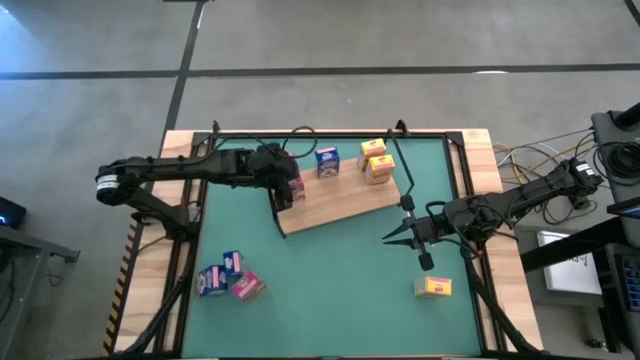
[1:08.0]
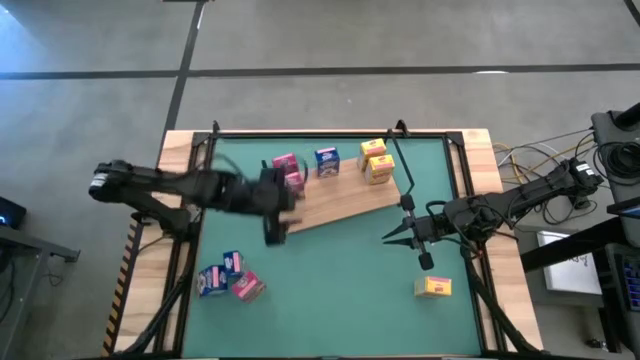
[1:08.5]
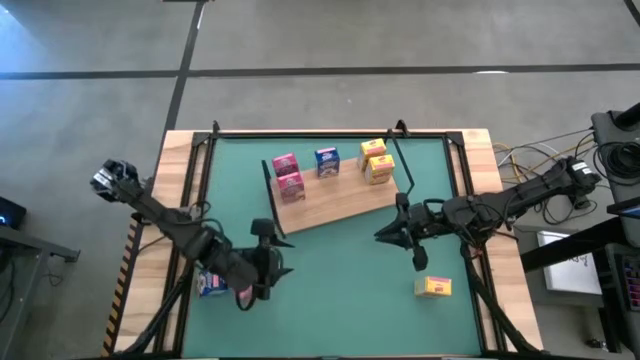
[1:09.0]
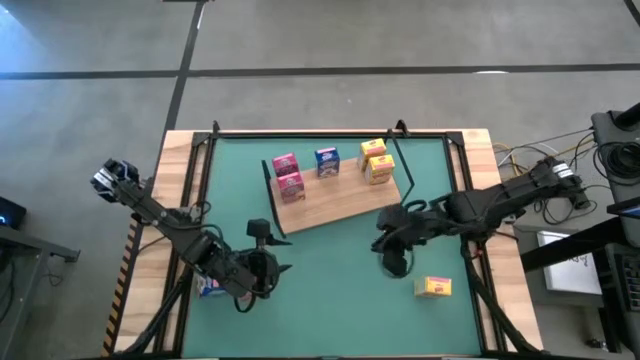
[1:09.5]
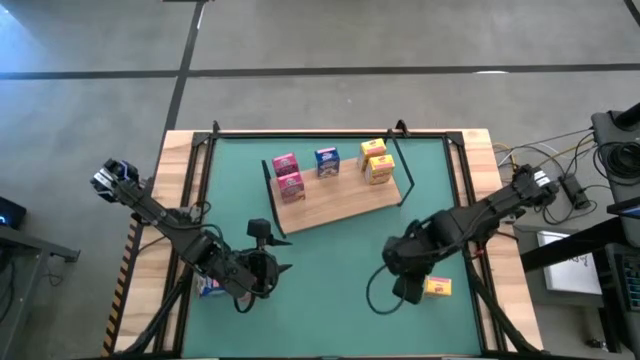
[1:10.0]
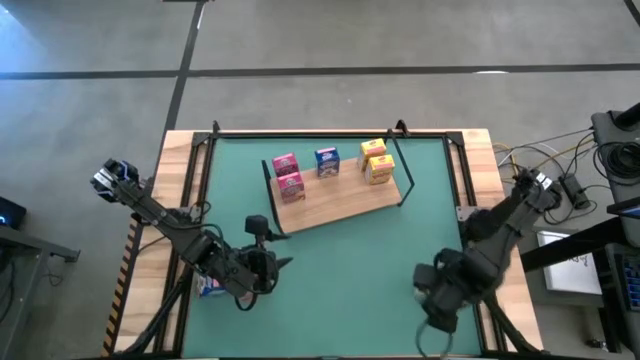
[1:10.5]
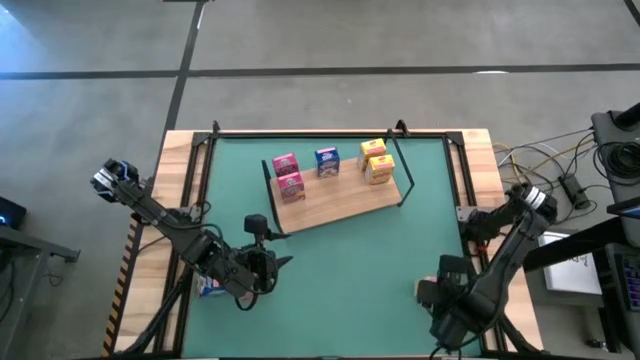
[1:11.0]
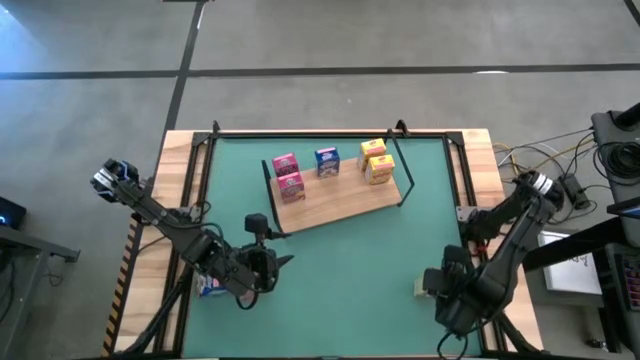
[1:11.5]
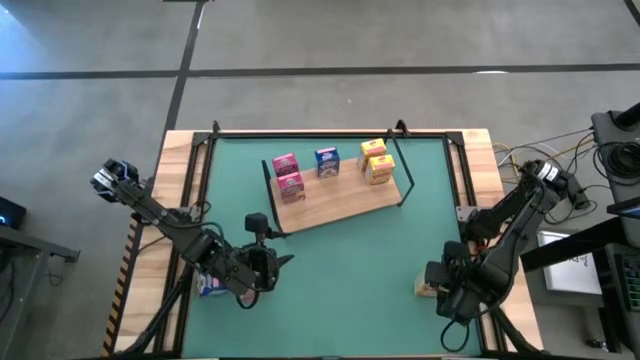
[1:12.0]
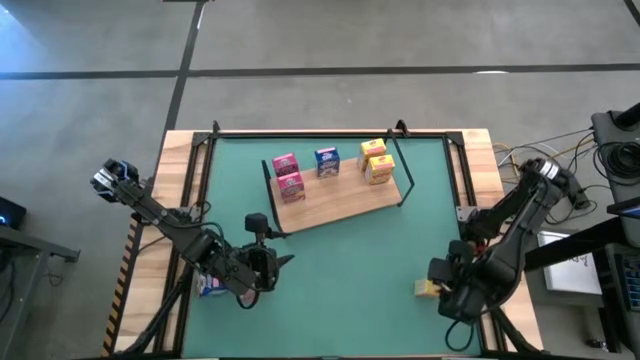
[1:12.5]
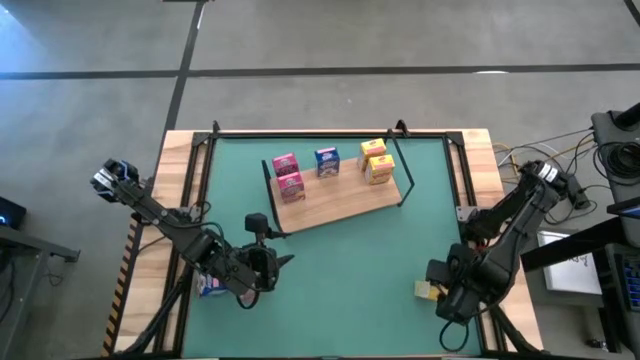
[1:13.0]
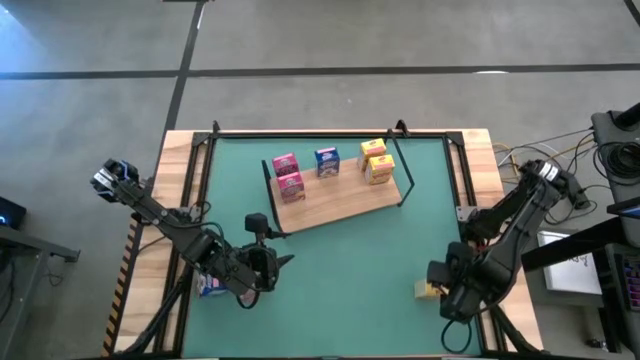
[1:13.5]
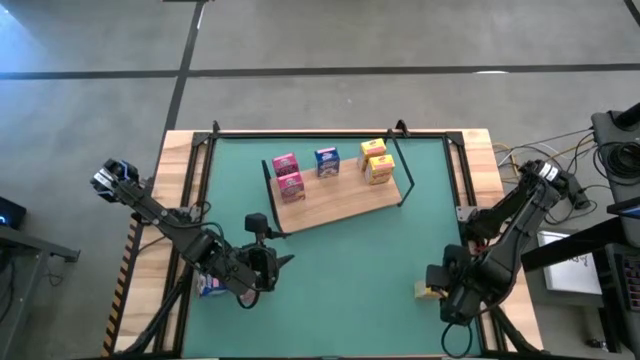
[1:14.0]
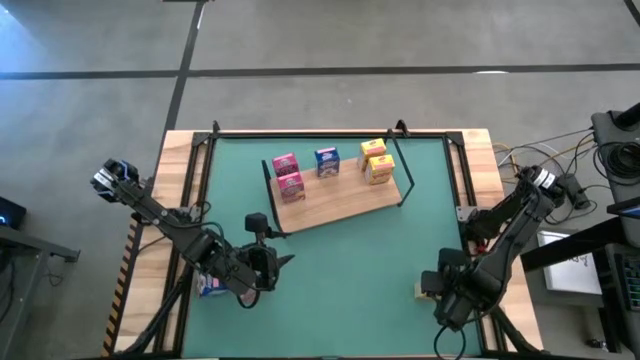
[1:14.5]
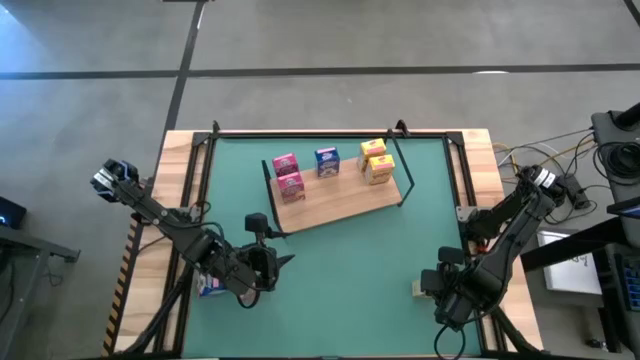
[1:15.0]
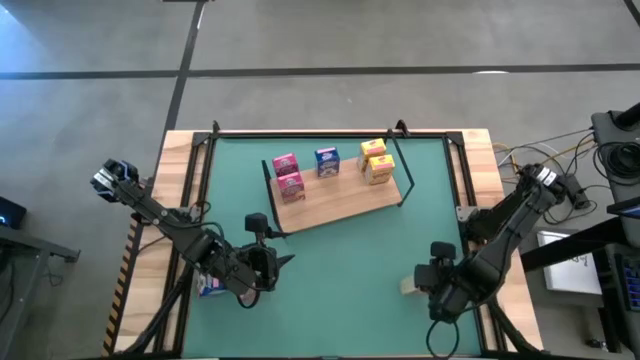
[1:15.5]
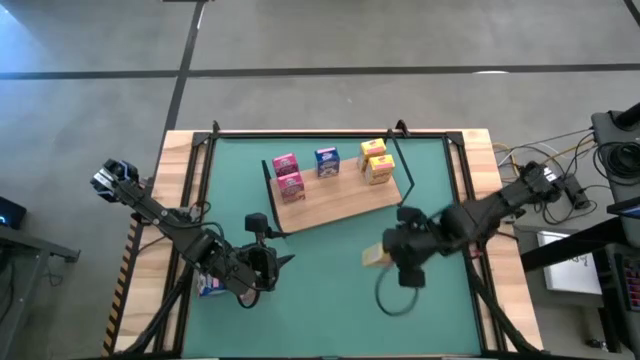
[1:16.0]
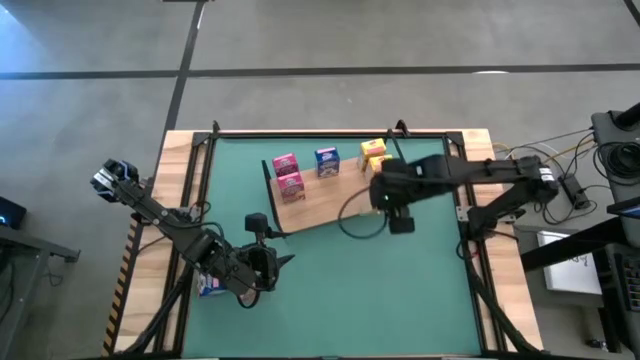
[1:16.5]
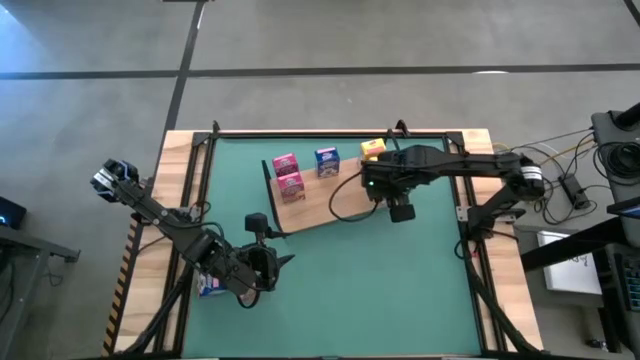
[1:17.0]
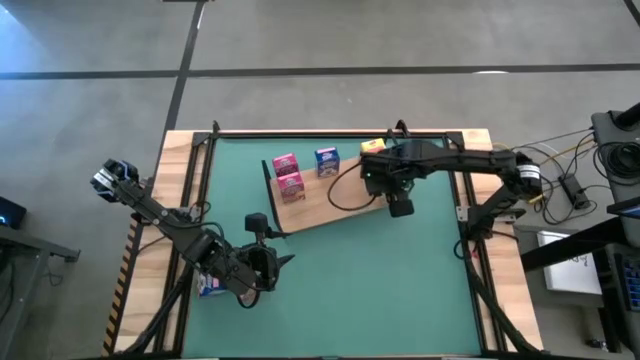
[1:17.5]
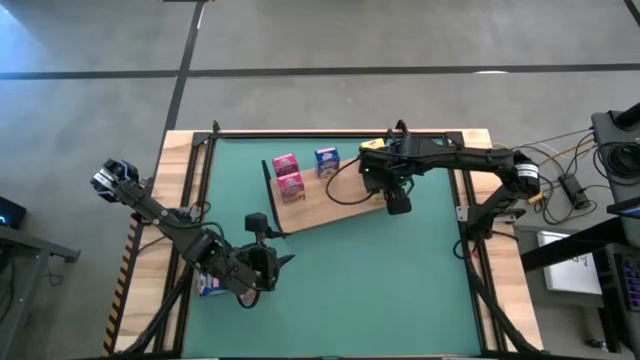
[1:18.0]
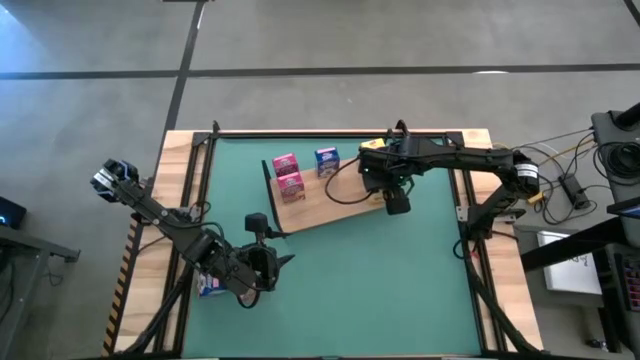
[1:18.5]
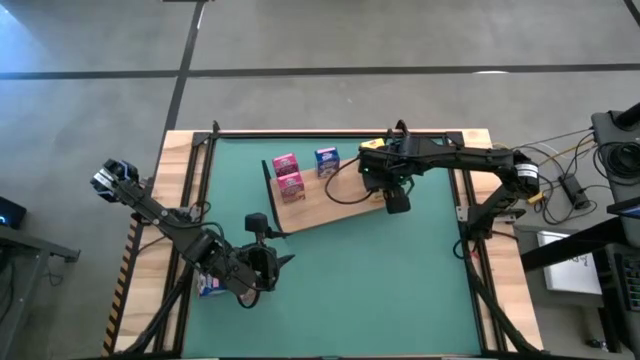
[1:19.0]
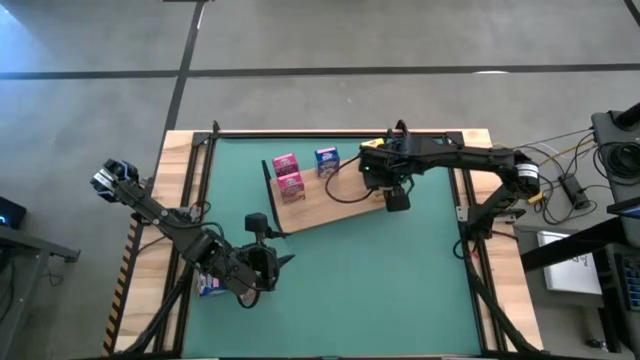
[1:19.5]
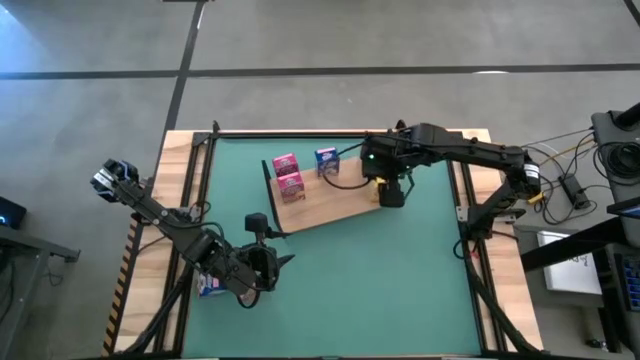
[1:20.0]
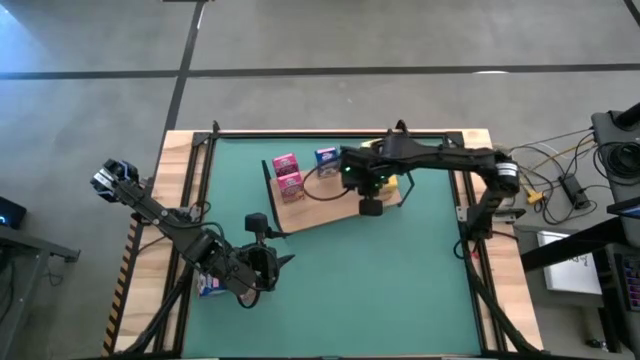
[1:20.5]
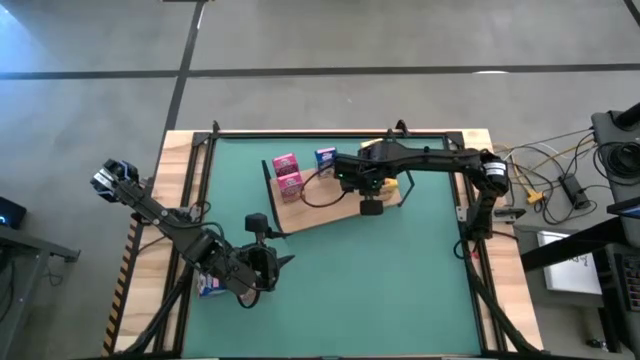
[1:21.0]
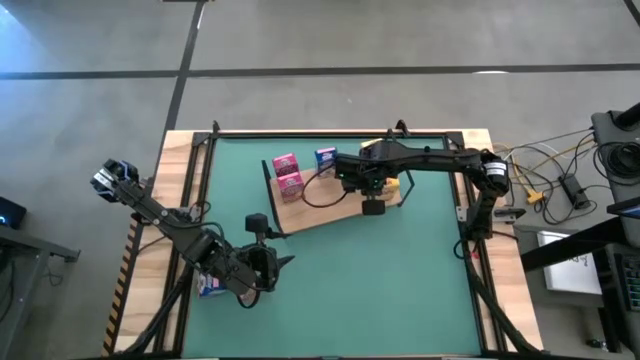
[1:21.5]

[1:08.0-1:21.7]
Task: Stack cereal on shelf
Put the yellow cereal box on the shelf aligned with the other yellow cereal boxes

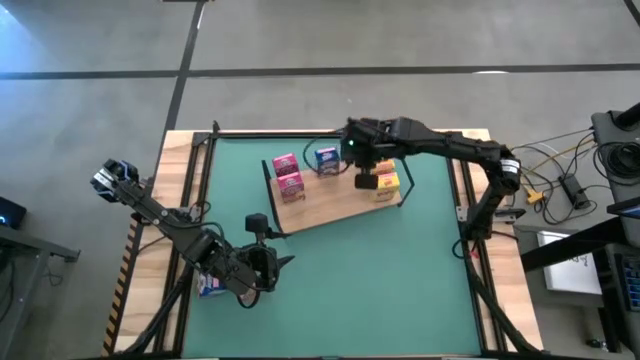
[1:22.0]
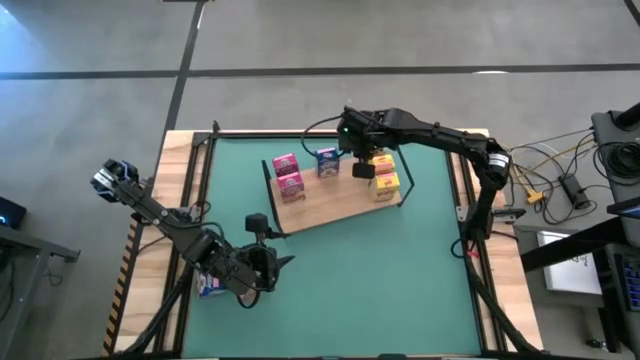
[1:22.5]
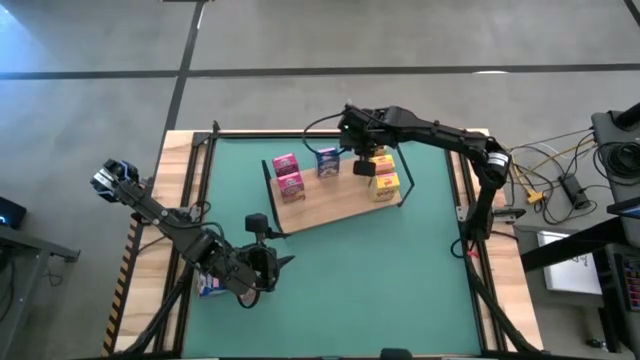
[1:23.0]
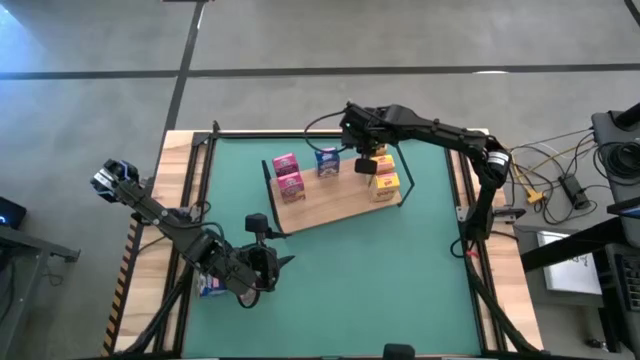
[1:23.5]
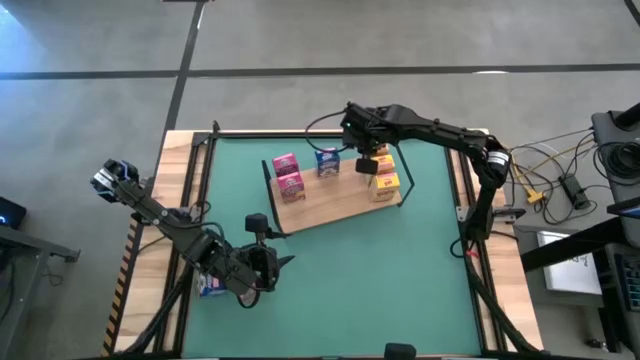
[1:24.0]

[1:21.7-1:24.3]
Adjust the yellow cereal box on the shelf

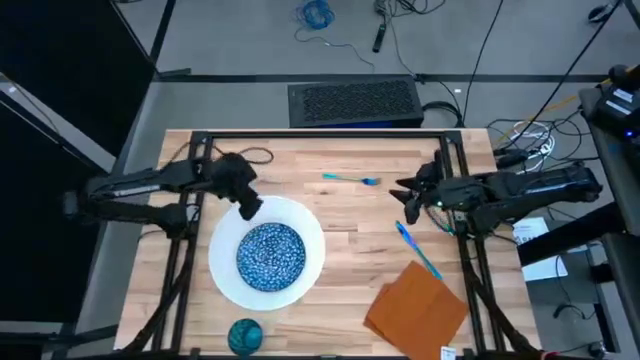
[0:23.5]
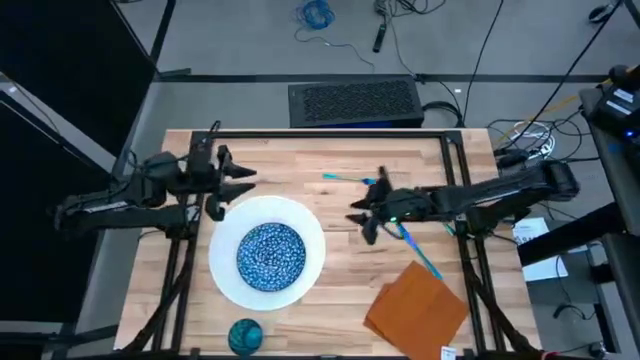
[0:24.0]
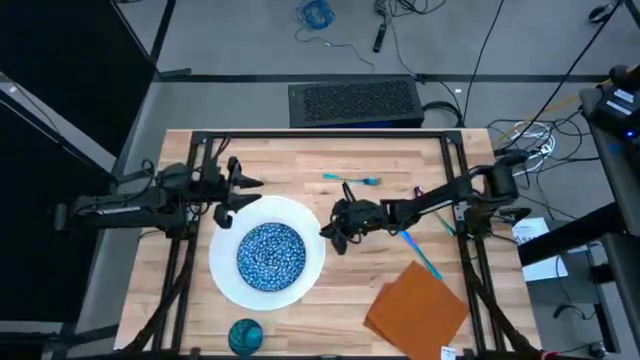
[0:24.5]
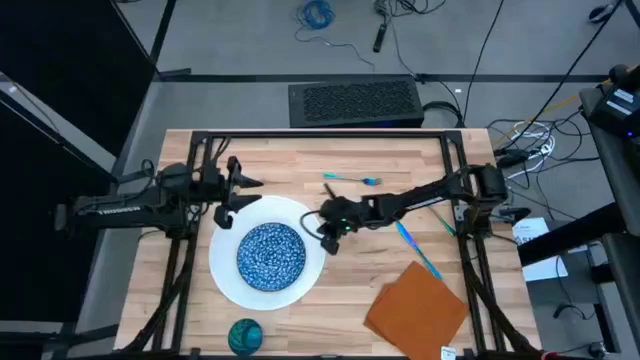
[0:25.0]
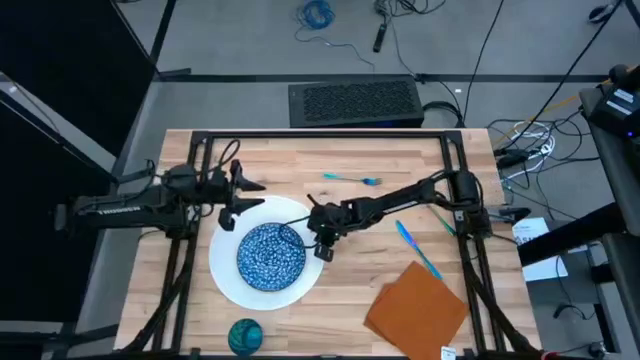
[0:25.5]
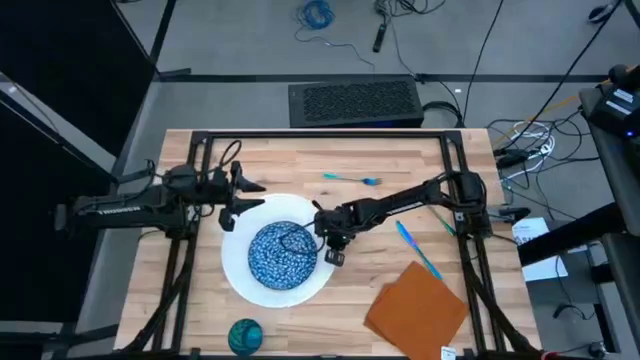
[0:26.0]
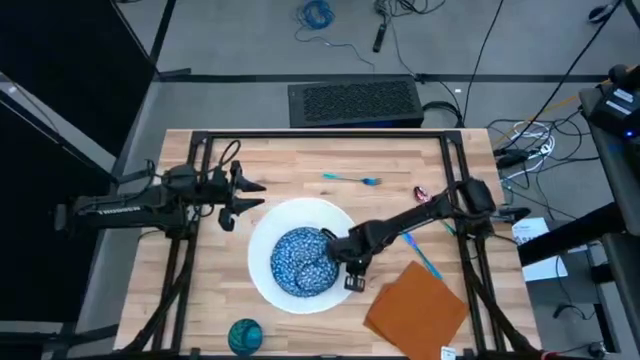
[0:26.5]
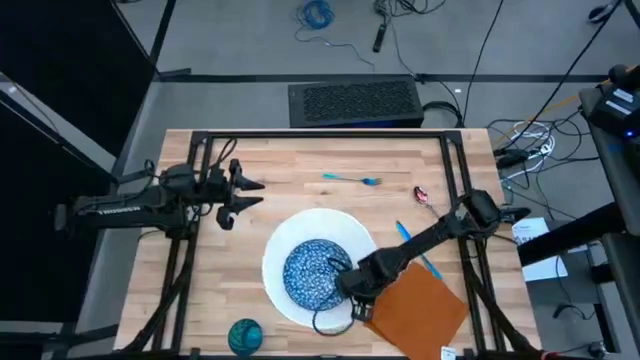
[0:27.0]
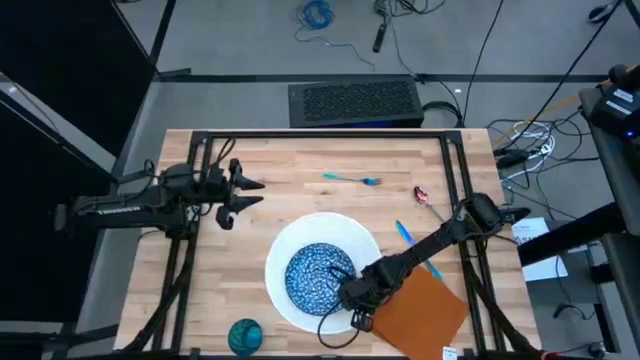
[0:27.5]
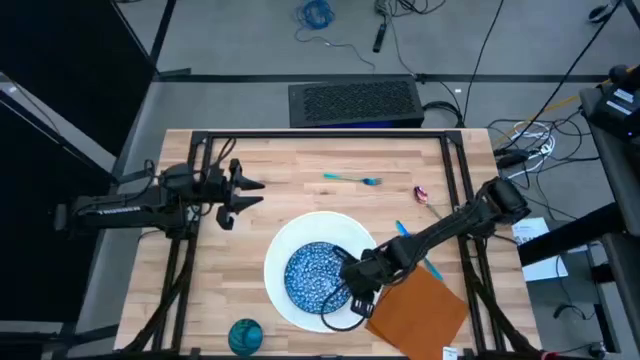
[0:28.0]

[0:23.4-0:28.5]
Task: Set table place
Adjust the white tablemat
